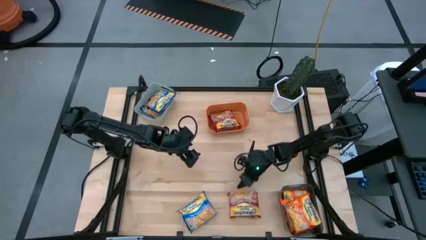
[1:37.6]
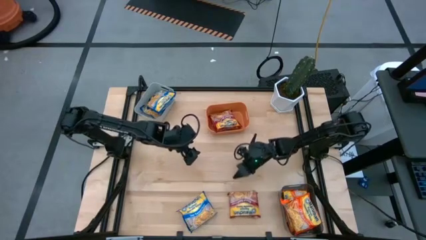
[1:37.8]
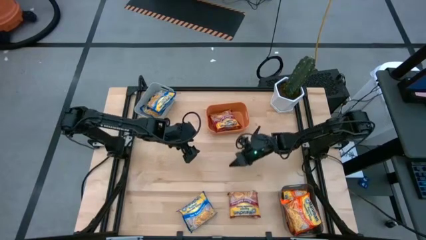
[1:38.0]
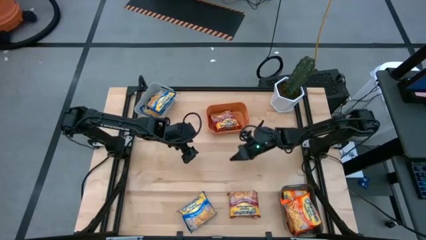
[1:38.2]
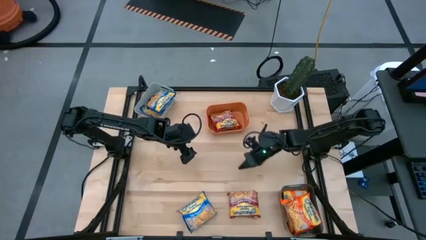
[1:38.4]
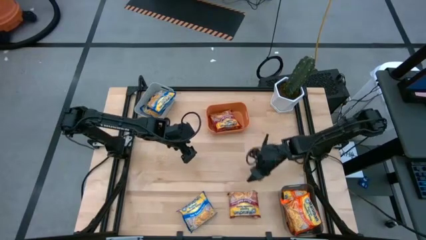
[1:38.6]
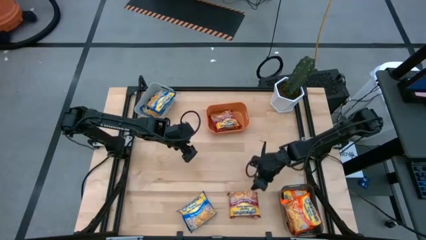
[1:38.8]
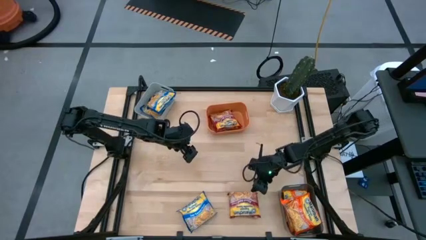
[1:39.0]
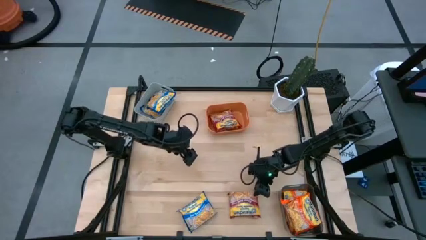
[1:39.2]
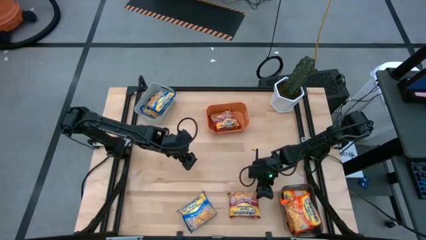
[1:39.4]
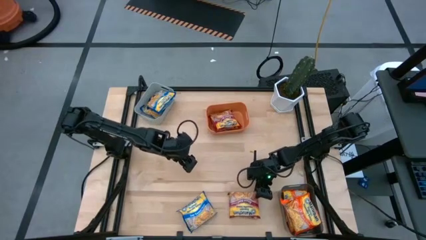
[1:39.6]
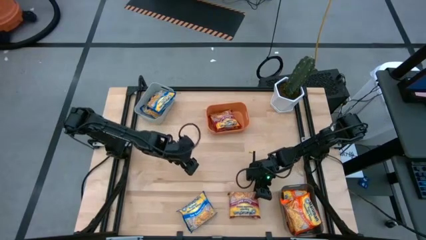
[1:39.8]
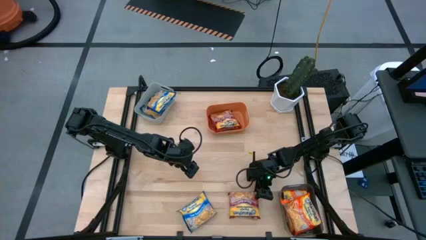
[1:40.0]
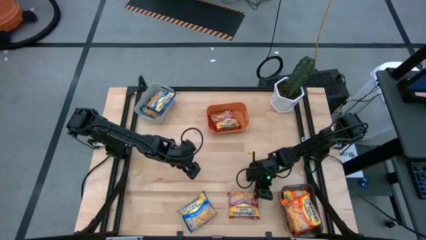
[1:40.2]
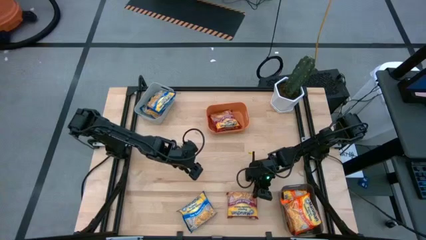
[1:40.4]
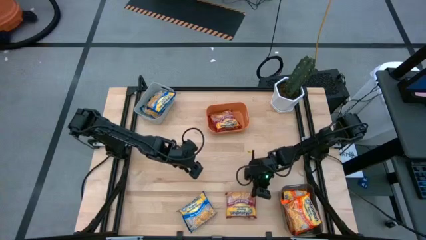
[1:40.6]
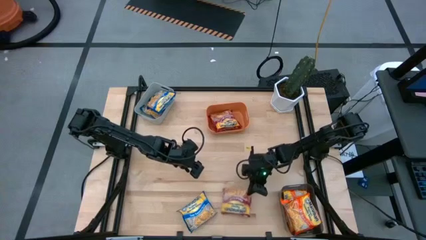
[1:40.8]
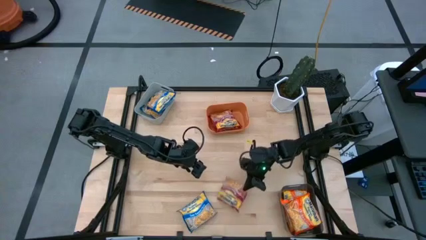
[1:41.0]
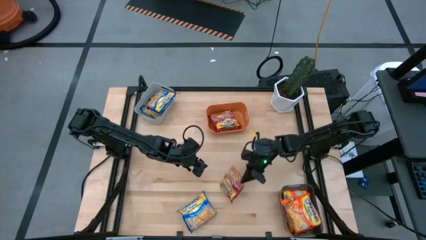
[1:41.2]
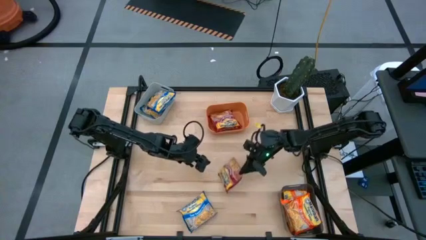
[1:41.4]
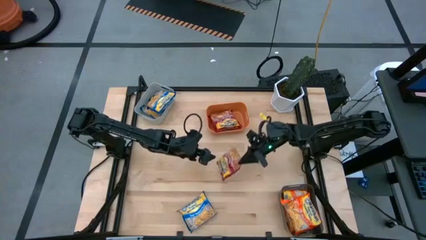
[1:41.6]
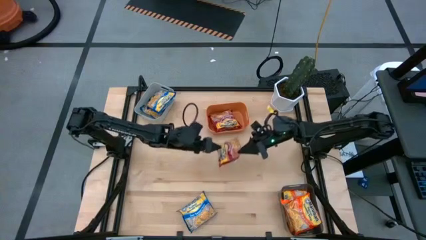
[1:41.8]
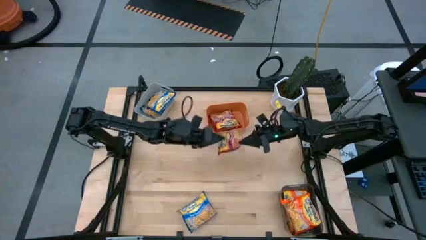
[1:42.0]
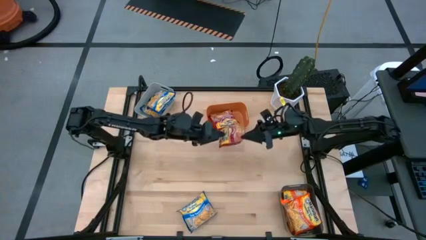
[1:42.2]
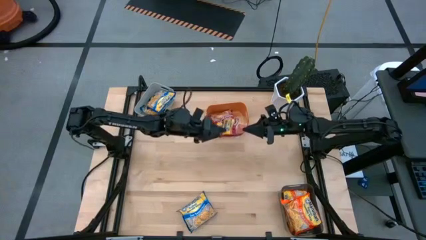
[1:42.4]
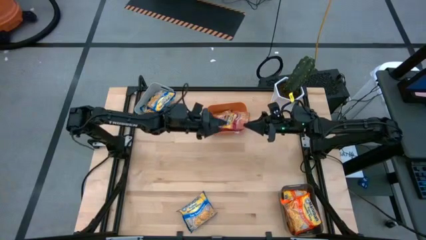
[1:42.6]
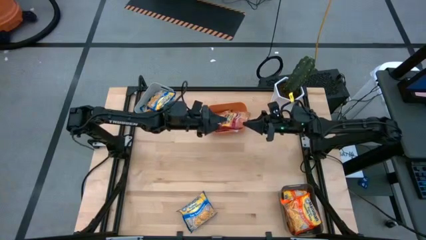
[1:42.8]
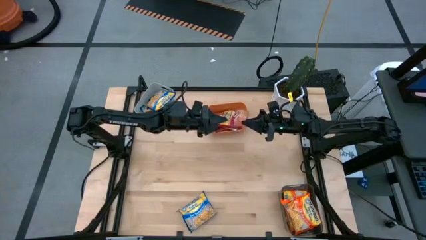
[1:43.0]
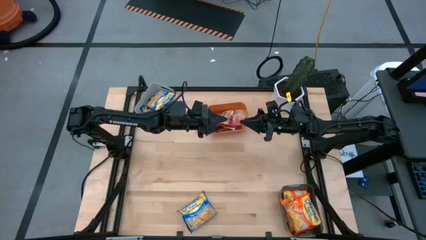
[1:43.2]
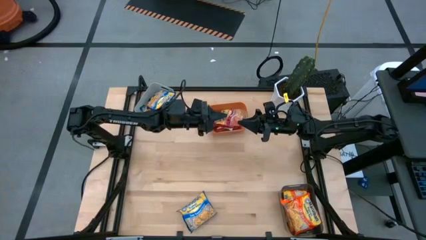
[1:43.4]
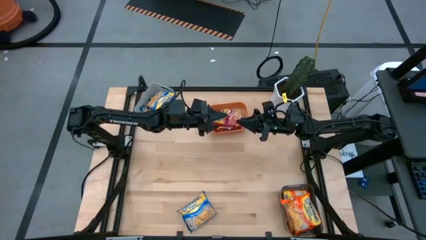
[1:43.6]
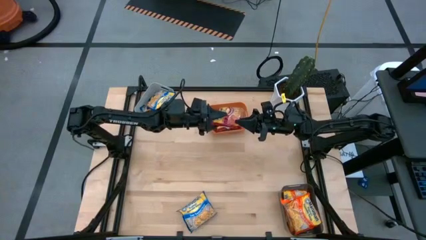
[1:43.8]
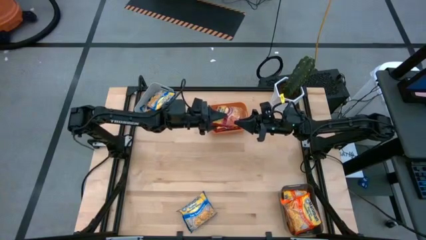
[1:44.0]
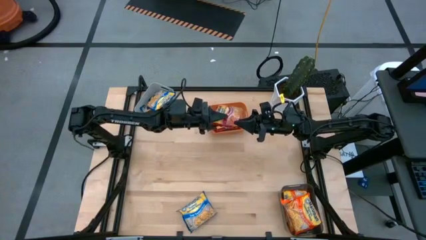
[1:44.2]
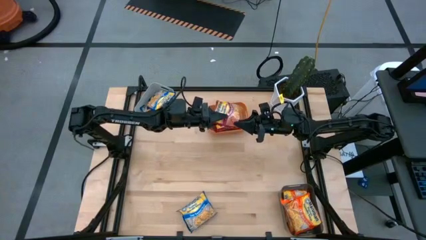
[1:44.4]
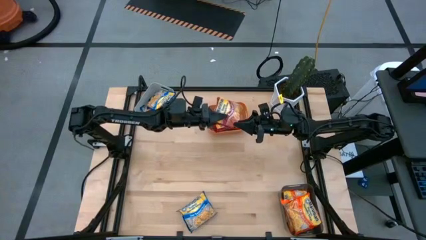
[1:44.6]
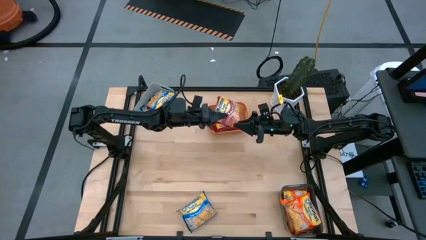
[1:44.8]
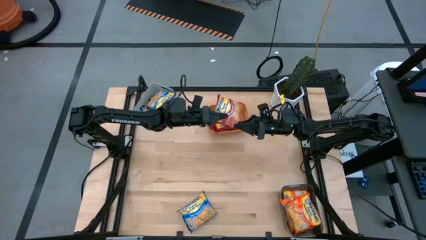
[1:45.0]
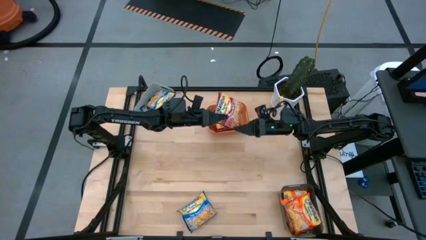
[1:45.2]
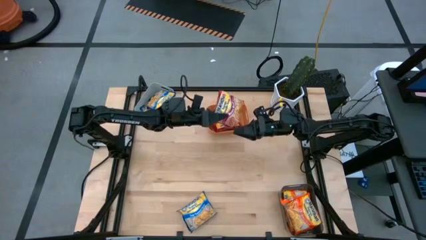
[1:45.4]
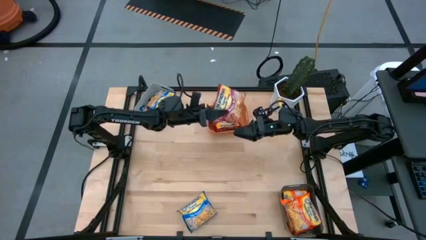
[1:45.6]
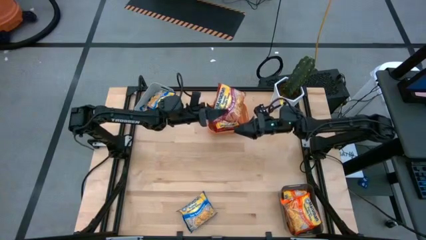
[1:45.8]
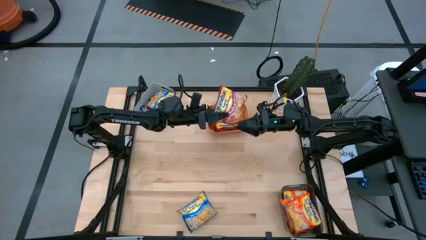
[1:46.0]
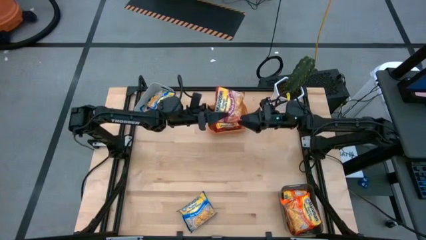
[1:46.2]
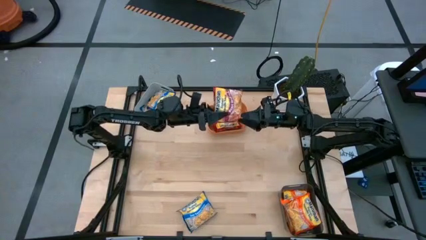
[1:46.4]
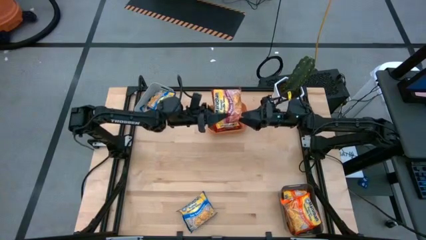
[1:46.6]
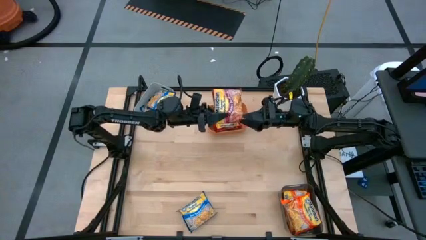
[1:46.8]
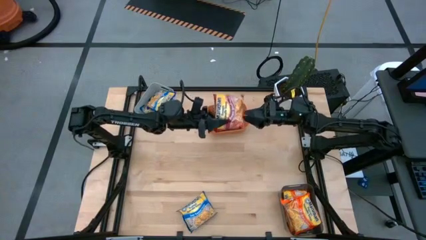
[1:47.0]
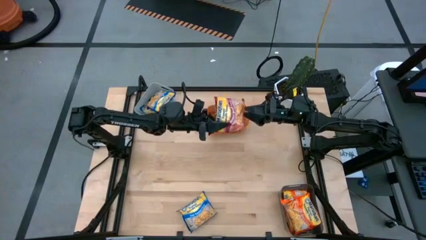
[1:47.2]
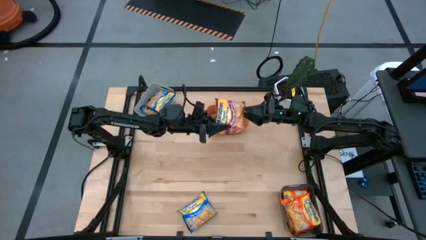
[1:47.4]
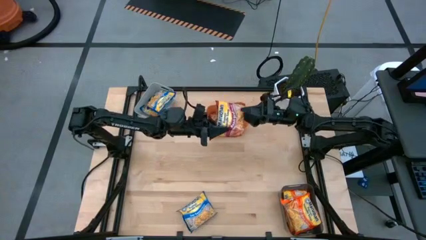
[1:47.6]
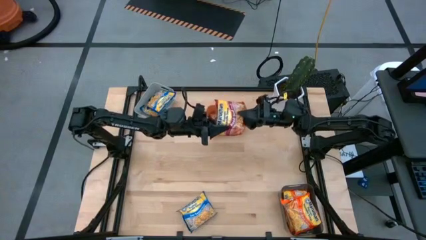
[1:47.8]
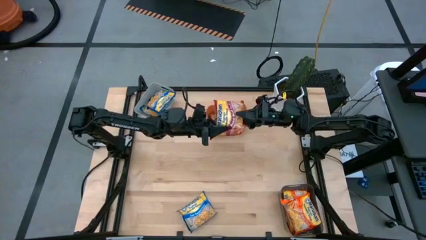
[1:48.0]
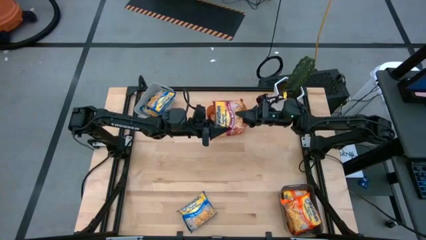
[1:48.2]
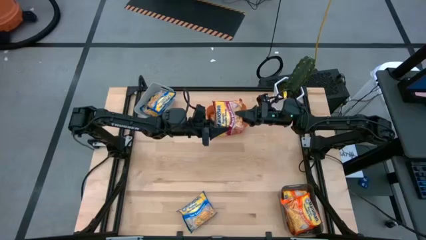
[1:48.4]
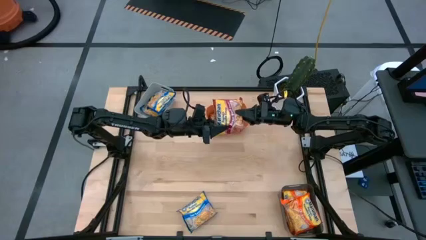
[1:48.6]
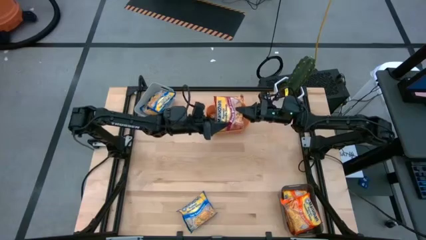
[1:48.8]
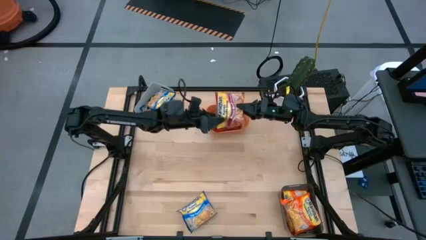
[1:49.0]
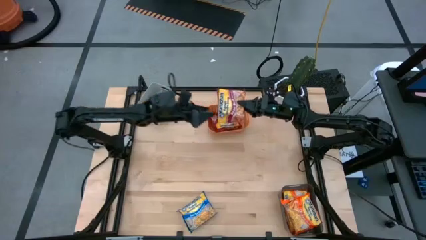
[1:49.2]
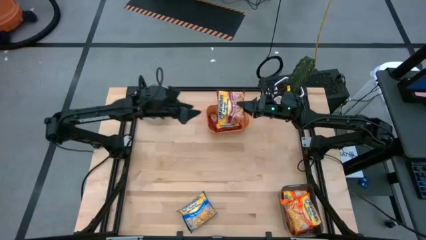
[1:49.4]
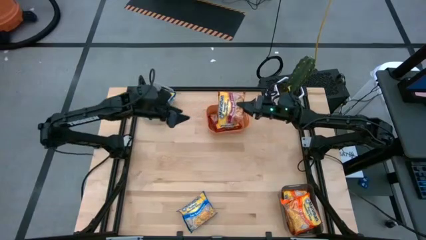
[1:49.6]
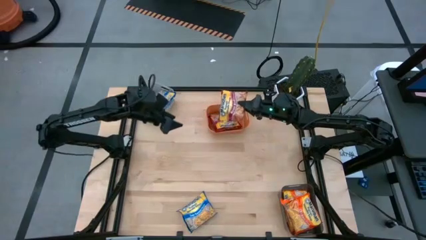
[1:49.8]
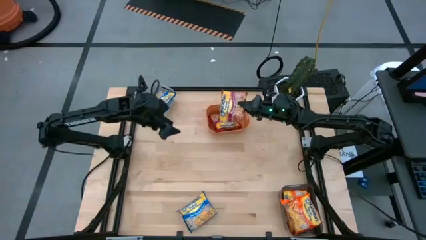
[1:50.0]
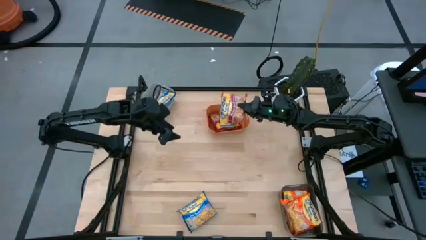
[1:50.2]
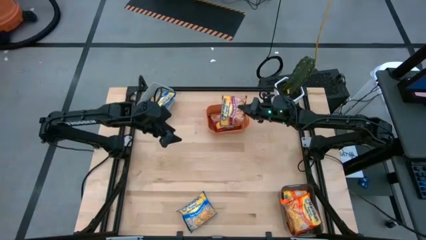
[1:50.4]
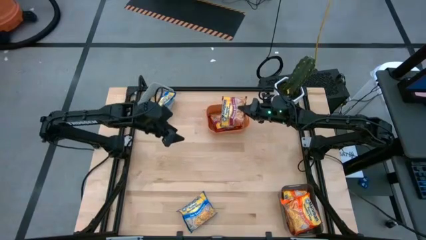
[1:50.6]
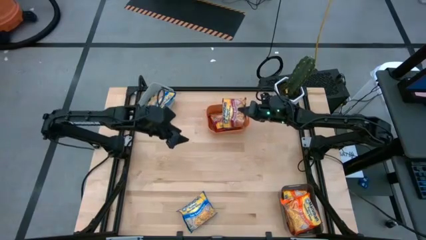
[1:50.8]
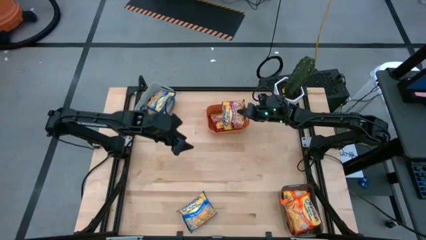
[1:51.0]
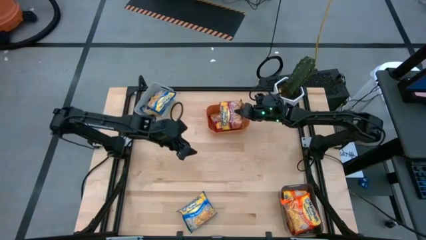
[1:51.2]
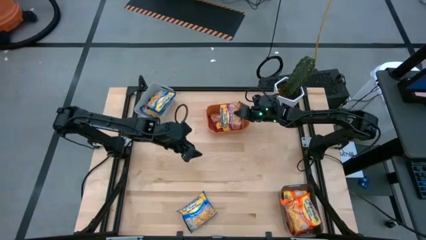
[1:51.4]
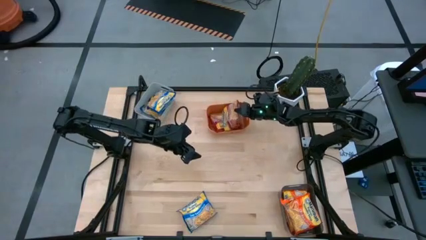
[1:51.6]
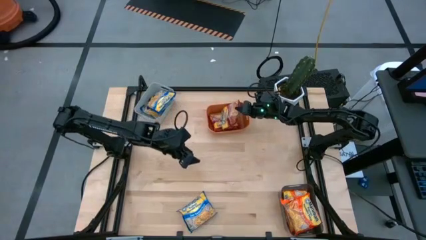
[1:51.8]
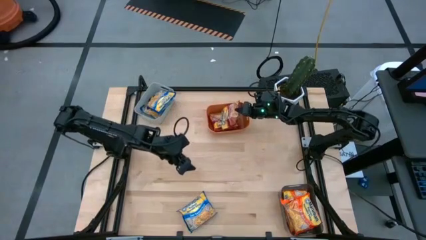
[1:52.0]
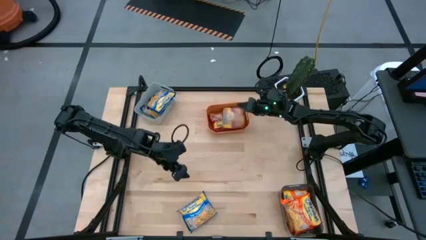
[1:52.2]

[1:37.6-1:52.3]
Task: Sort Maruchan noodles
Put the red noodle pack into the orange bin
